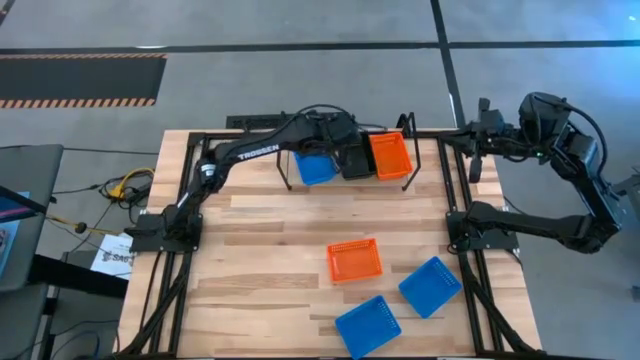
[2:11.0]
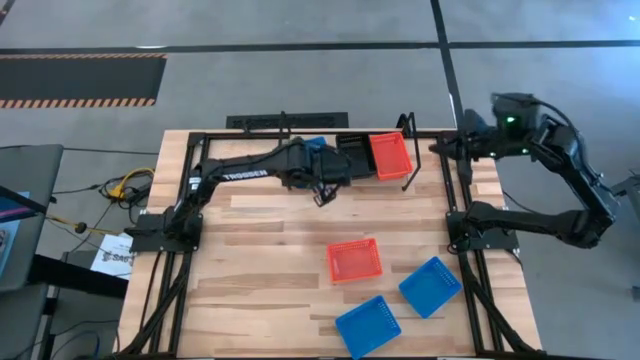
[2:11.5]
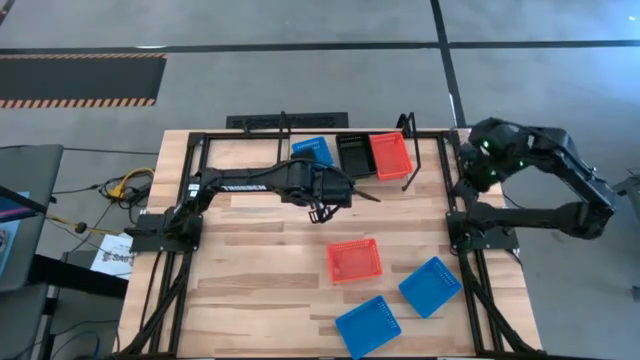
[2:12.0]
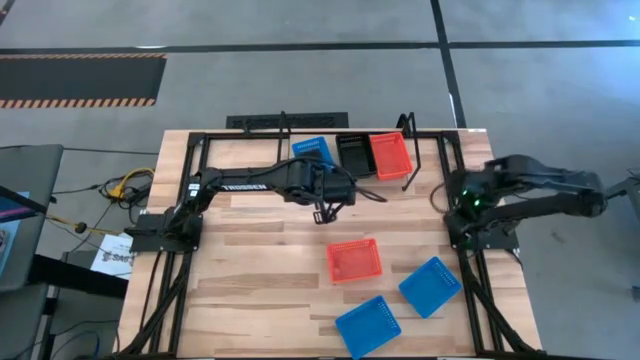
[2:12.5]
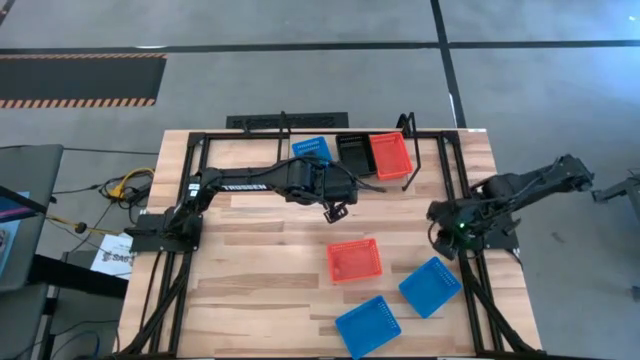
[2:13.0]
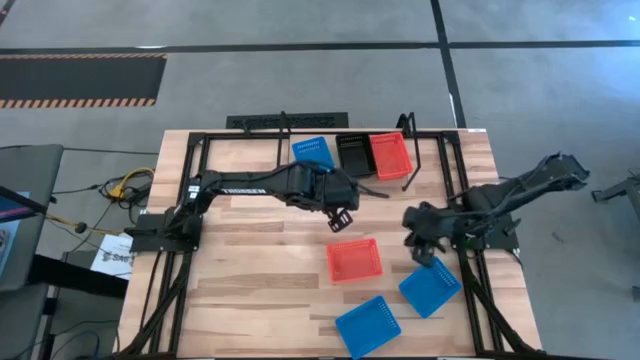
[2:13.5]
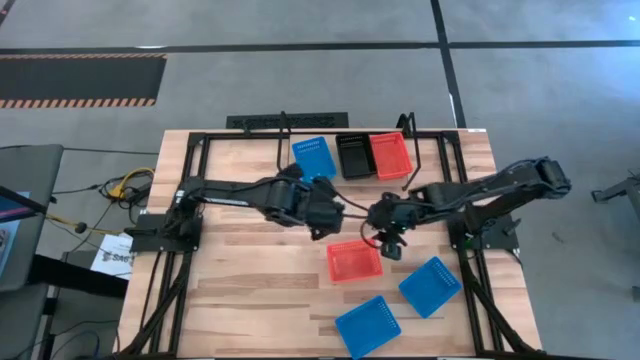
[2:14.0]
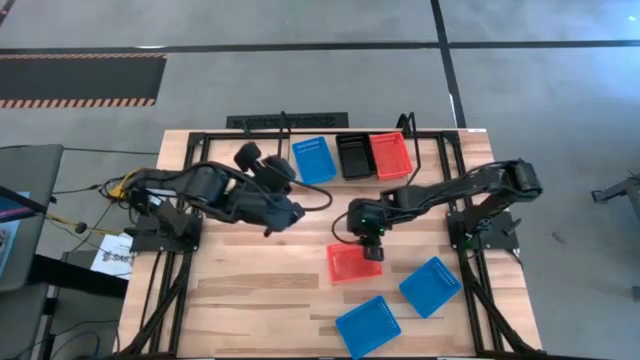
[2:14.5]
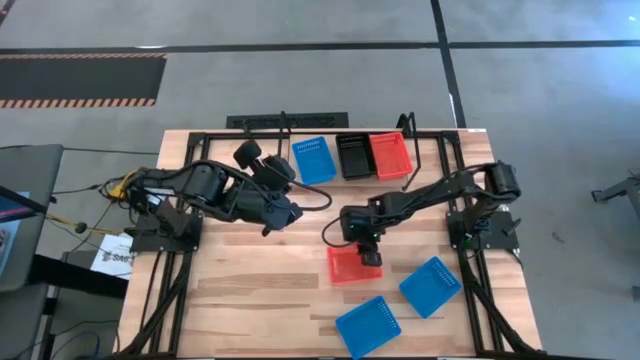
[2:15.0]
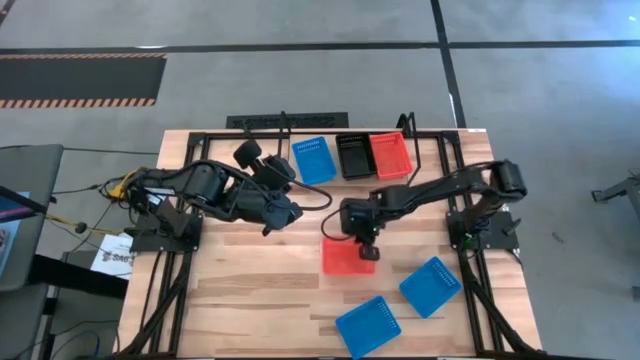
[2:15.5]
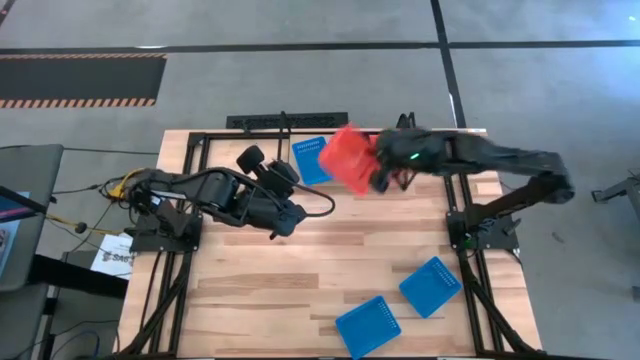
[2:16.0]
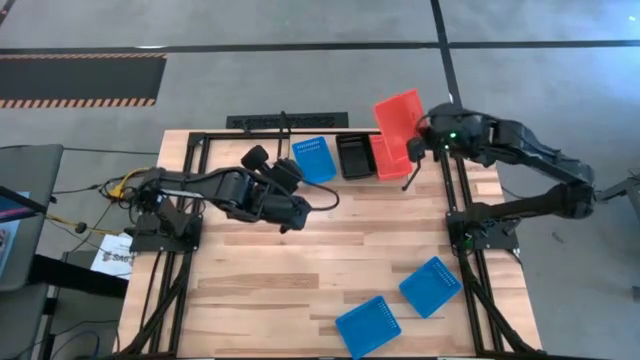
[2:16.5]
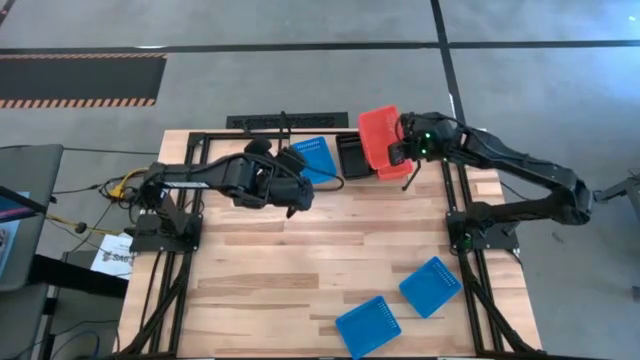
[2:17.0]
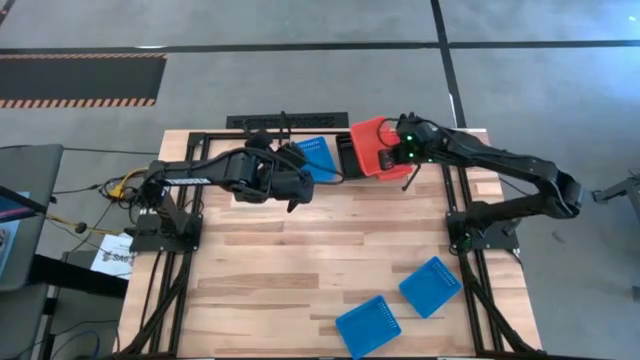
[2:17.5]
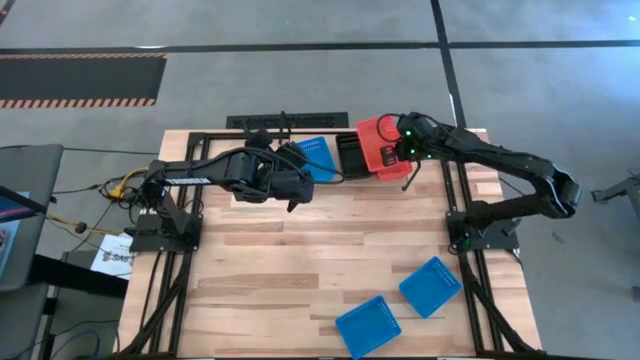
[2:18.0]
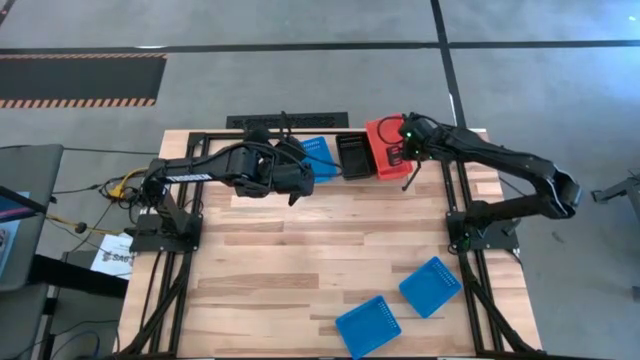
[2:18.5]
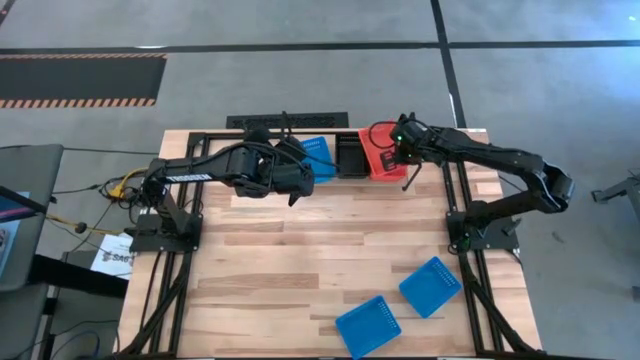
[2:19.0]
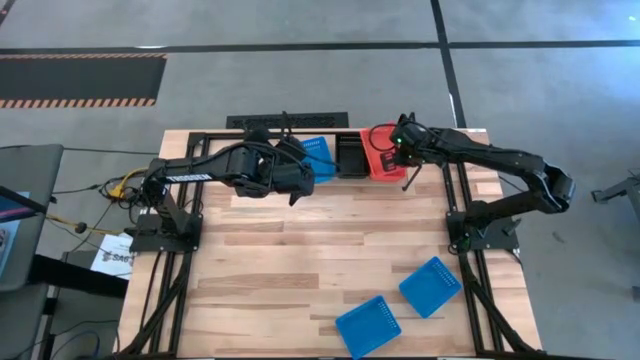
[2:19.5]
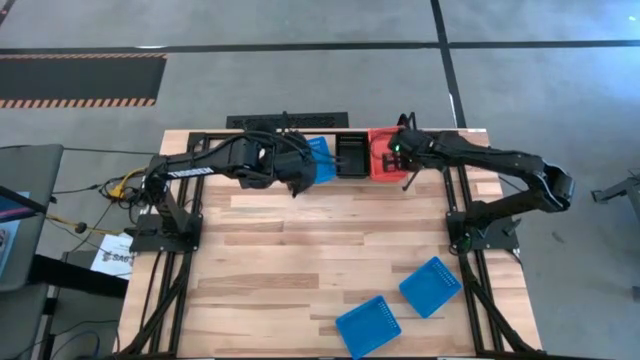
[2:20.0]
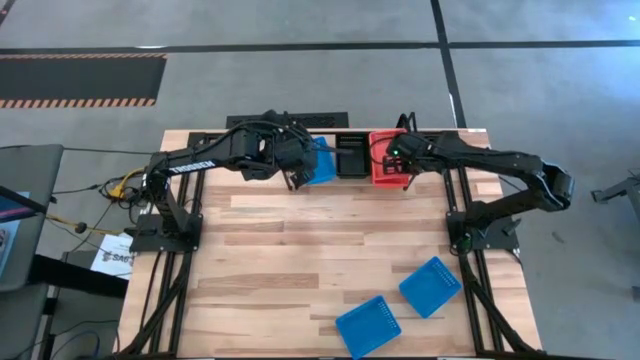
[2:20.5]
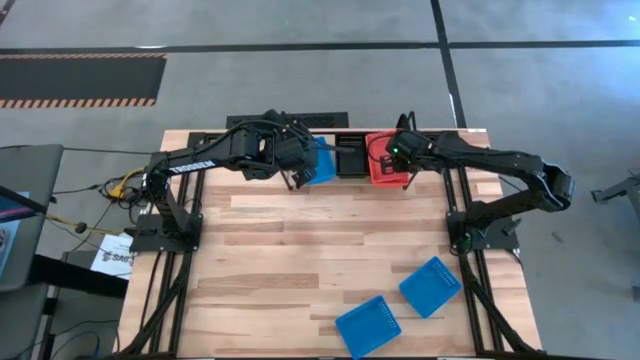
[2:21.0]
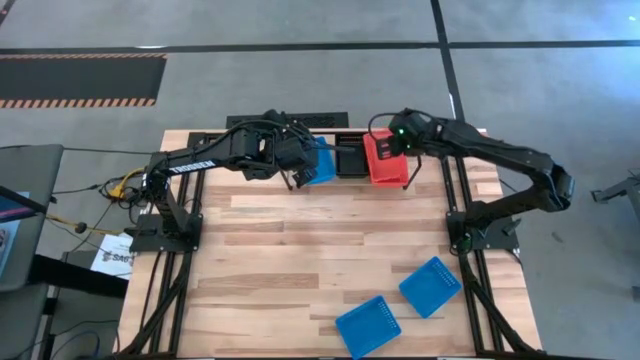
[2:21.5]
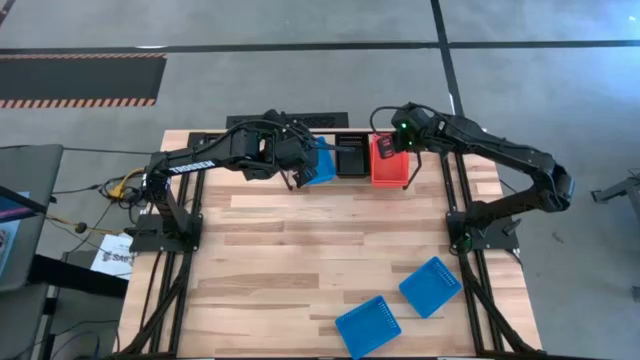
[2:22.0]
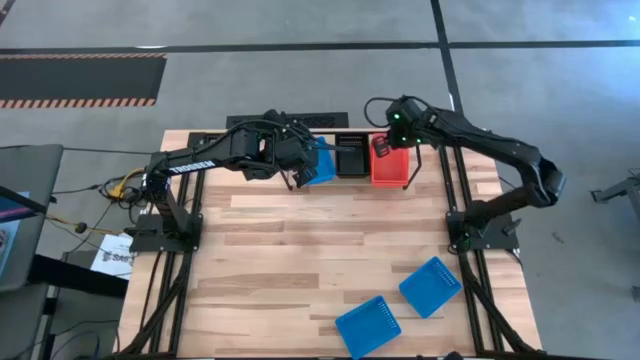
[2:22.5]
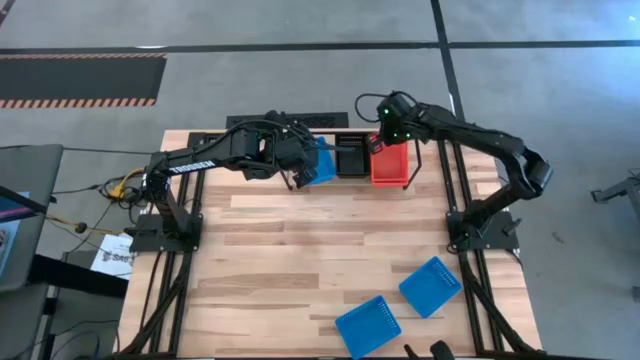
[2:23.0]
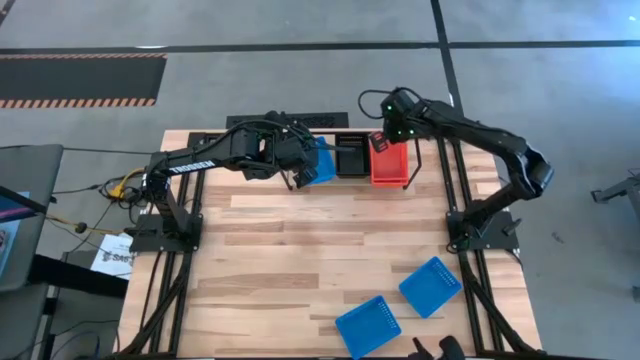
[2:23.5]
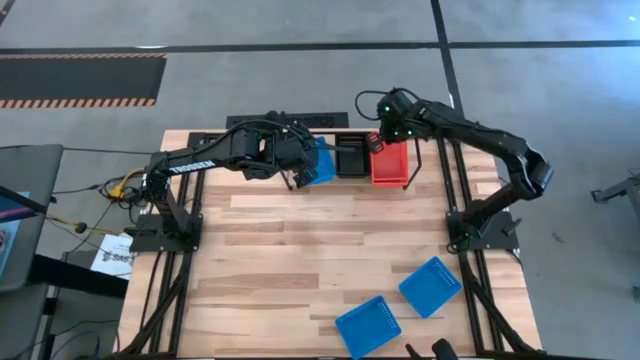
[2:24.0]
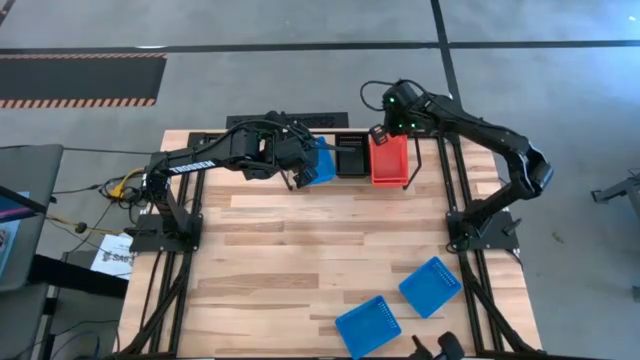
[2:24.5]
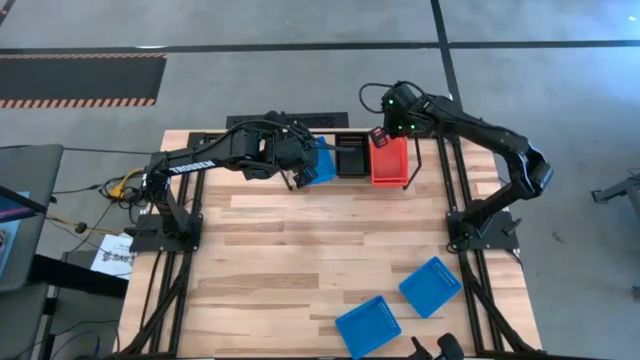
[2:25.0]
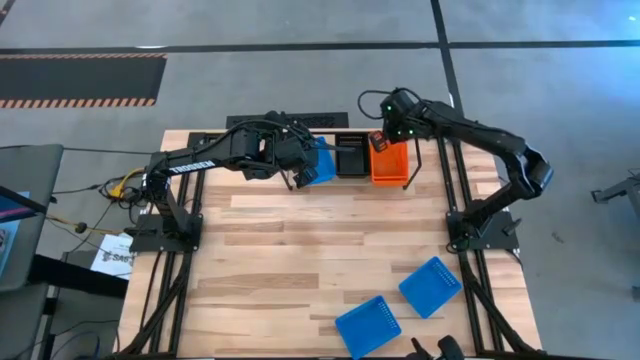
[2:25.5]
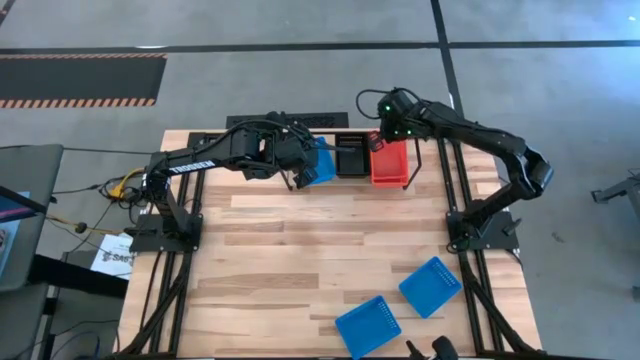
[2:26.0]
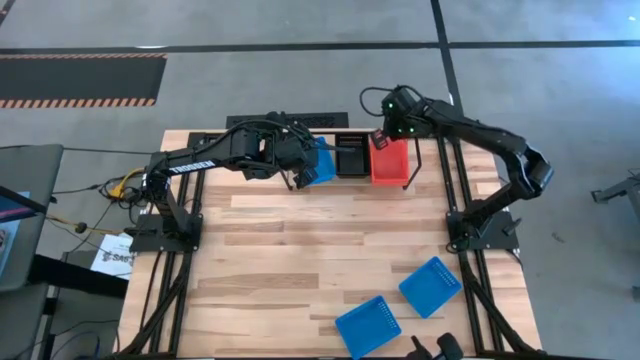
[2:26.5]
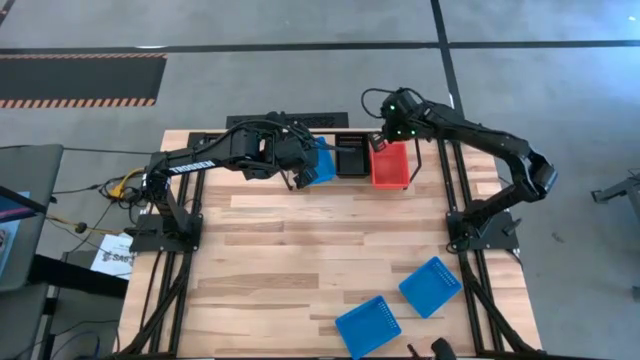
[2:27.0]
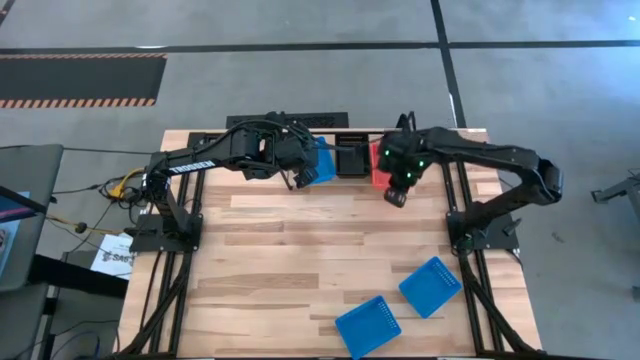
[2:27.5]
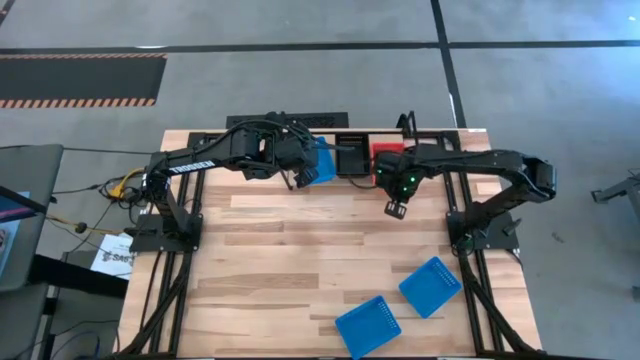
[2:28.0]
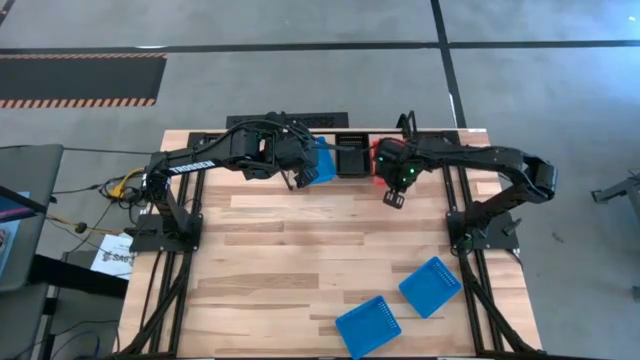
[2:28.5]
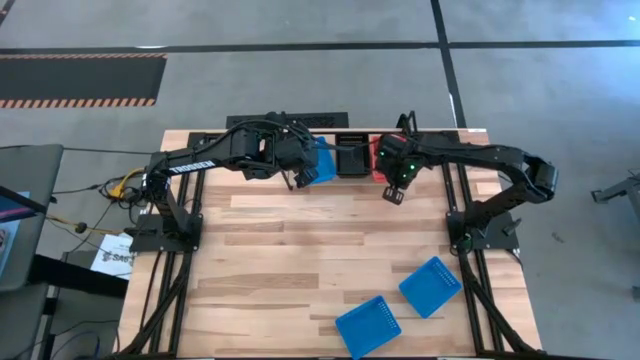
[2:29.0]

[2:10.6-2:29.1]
Task: Stack baskets on shelf by color
Stack the orange bin on top of the orange bin on the shelf

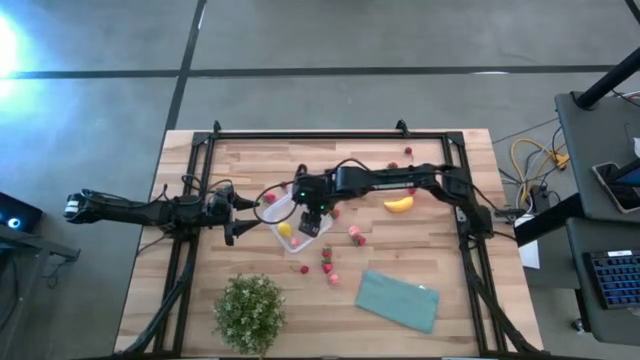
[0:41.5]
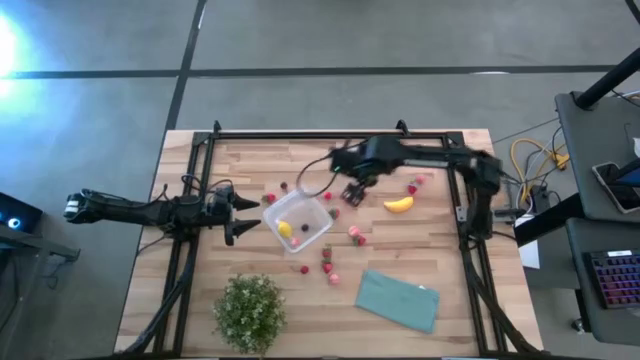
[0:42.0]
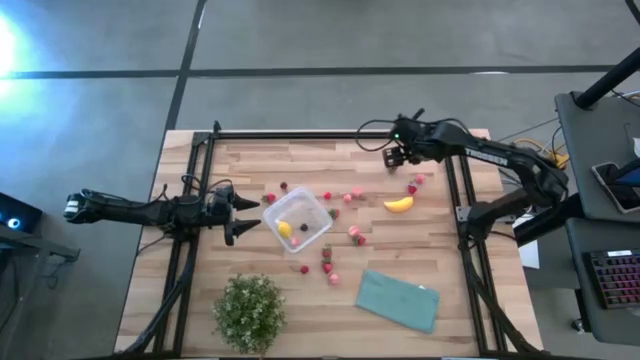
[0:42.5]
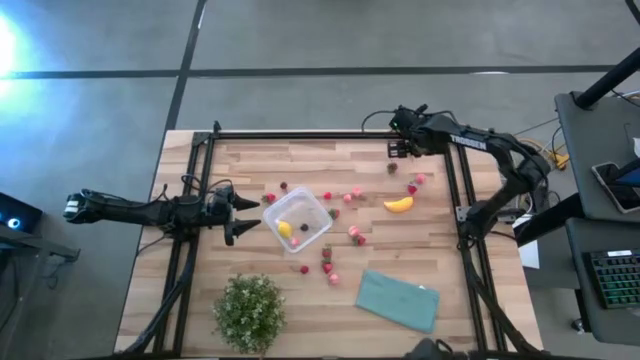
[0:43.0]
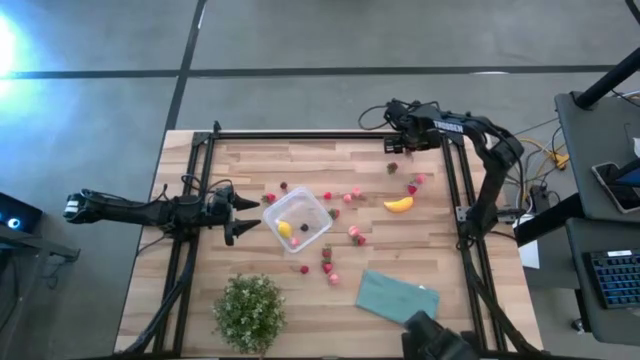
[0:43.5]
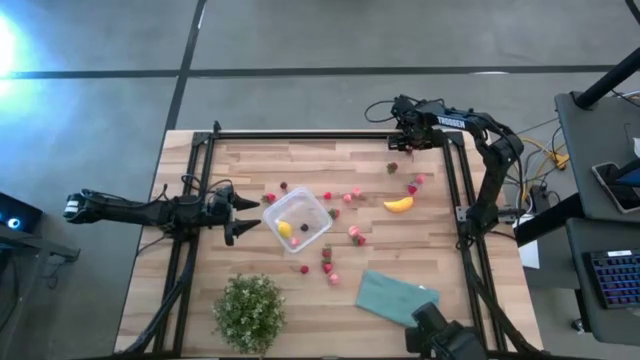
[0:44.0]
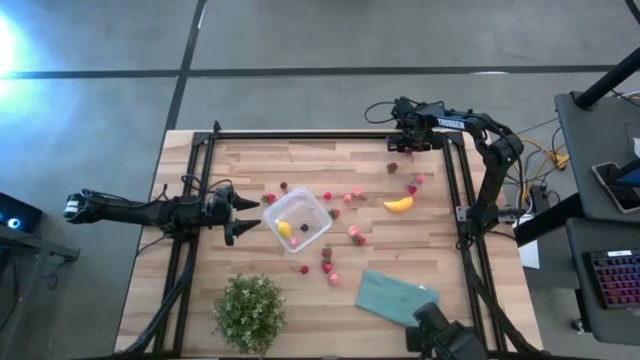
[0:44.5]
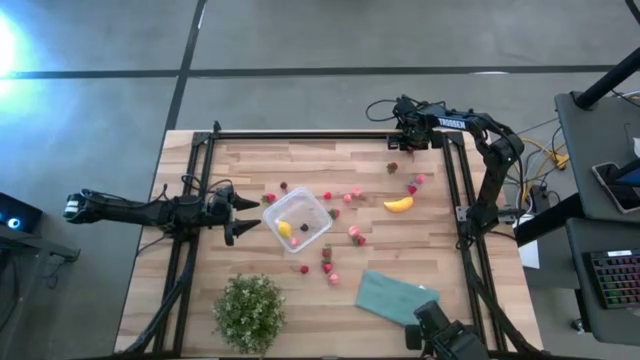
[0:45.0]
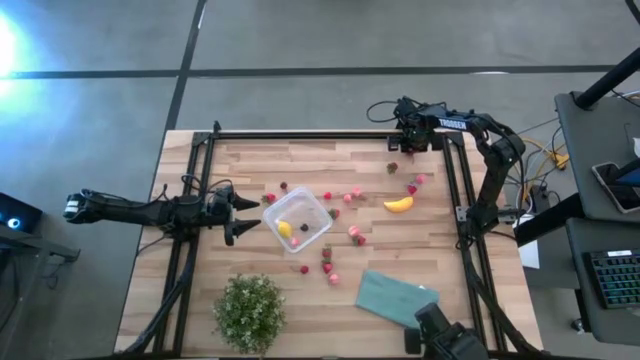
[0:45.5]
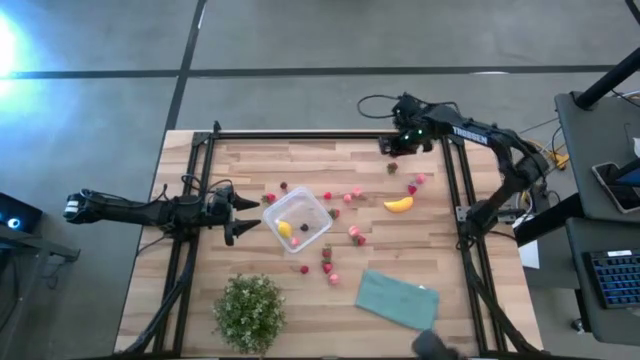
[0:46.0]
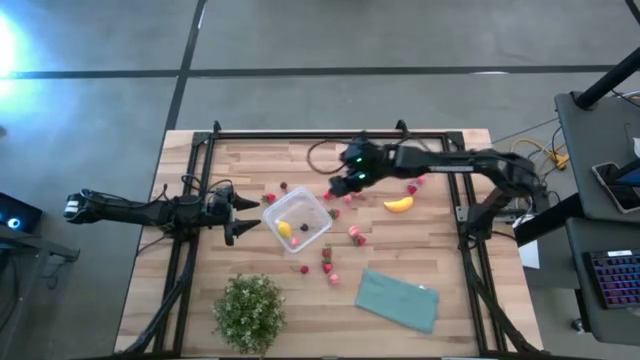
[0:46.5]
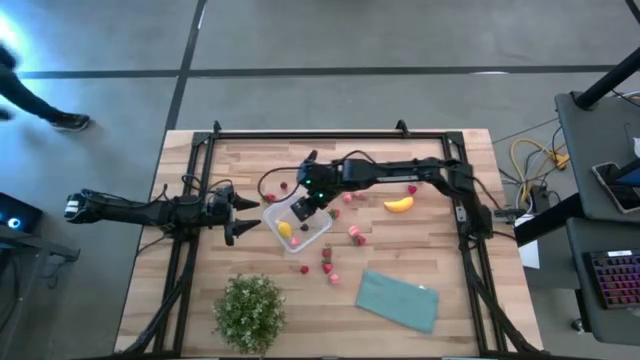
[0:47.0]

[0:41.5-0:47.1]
Task: Pick and placing Produce into tupperware
Put the dark red cherry into the transparent bin
